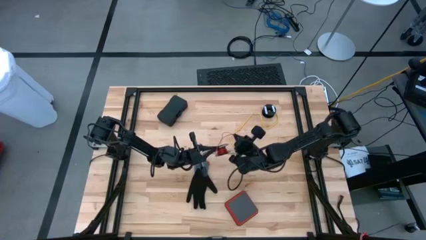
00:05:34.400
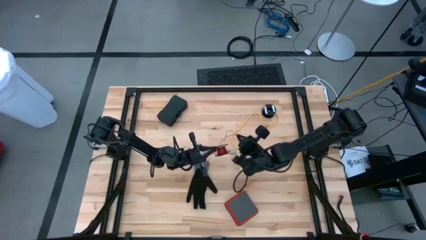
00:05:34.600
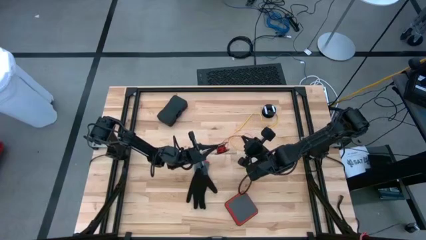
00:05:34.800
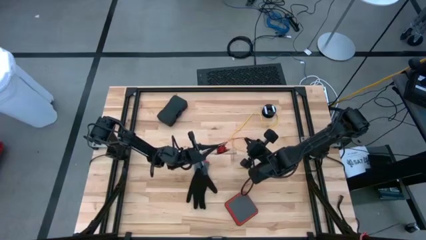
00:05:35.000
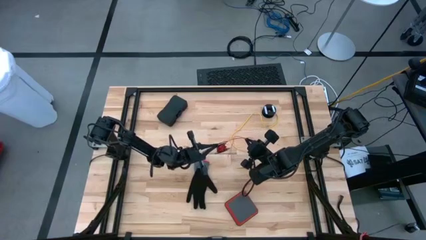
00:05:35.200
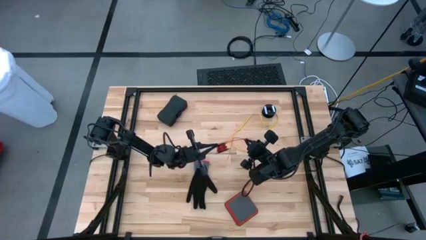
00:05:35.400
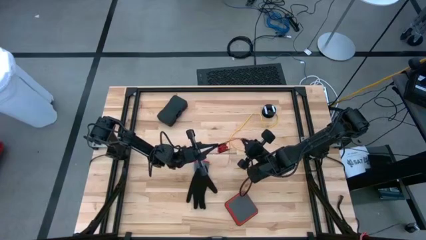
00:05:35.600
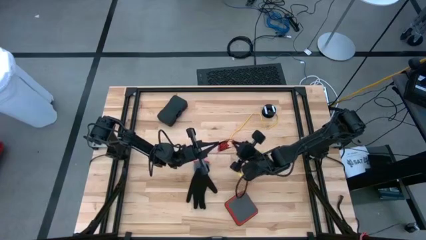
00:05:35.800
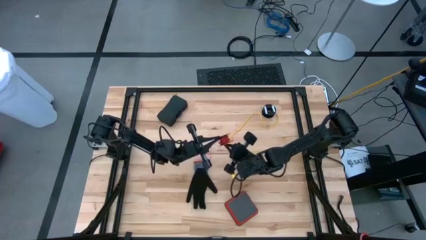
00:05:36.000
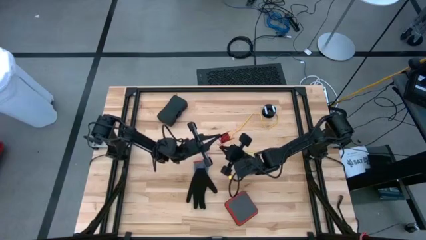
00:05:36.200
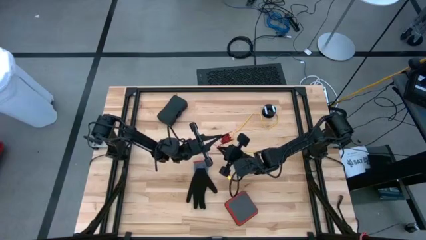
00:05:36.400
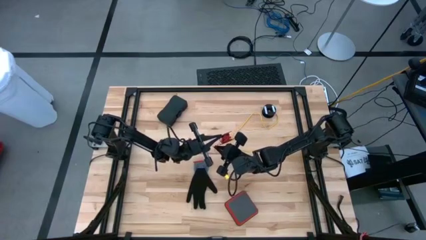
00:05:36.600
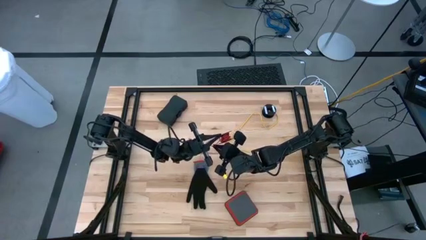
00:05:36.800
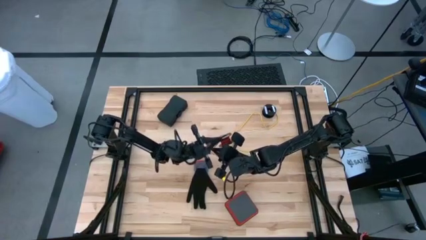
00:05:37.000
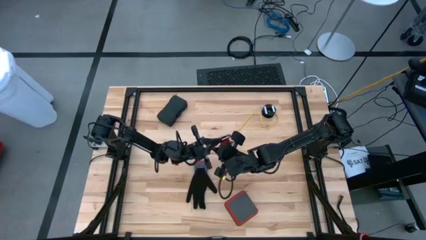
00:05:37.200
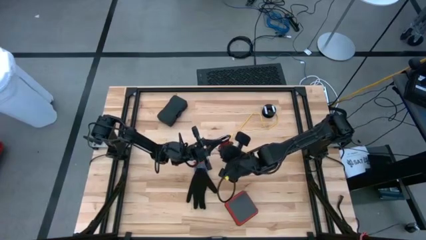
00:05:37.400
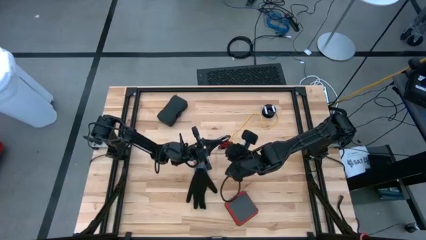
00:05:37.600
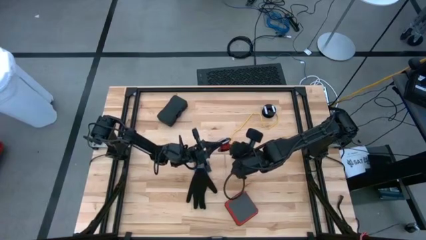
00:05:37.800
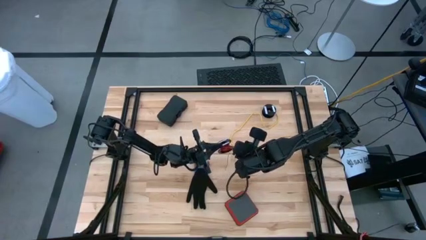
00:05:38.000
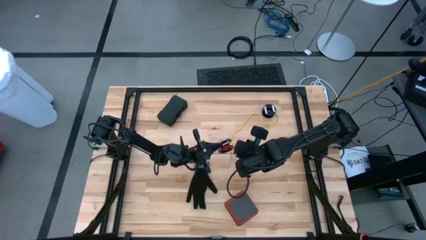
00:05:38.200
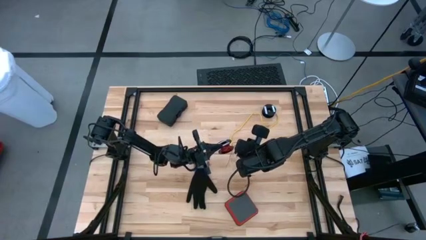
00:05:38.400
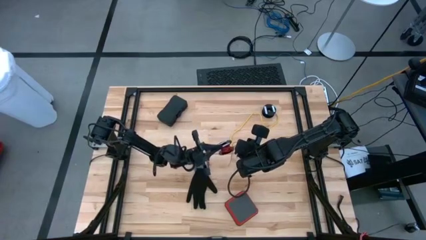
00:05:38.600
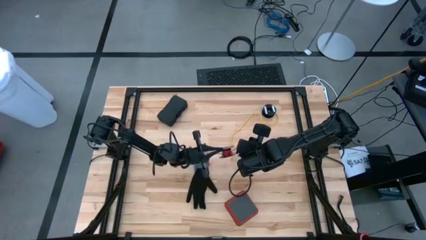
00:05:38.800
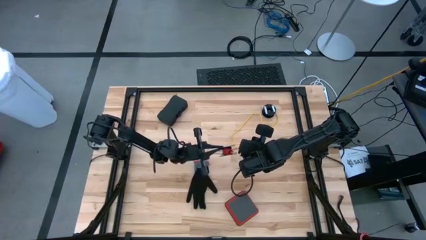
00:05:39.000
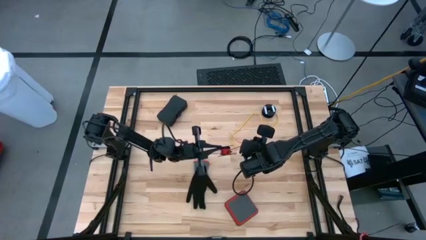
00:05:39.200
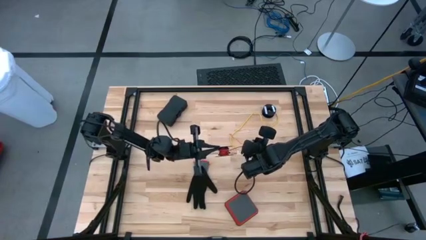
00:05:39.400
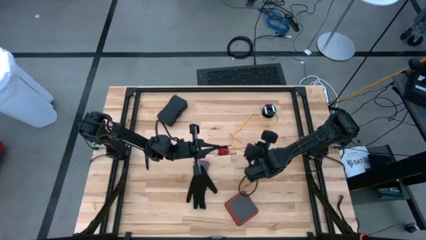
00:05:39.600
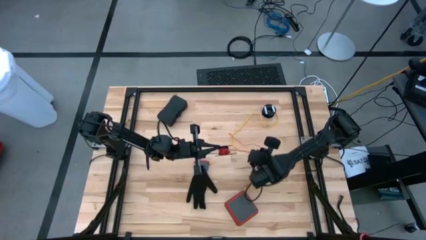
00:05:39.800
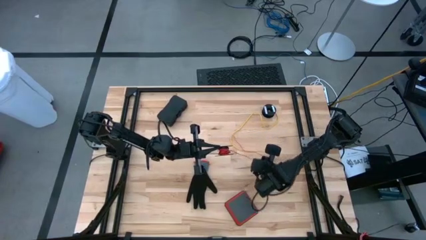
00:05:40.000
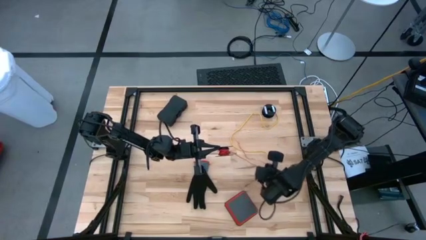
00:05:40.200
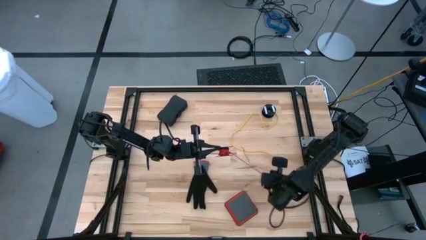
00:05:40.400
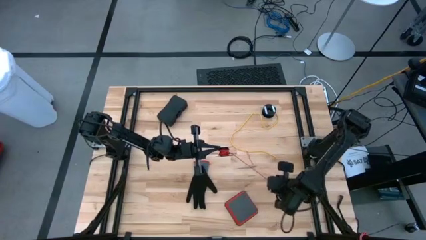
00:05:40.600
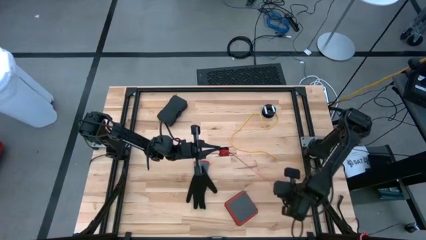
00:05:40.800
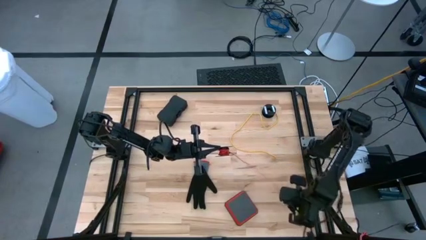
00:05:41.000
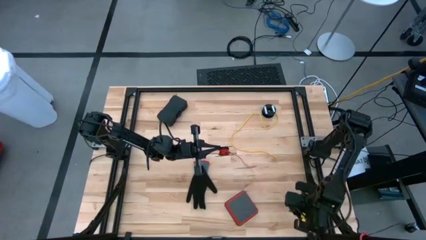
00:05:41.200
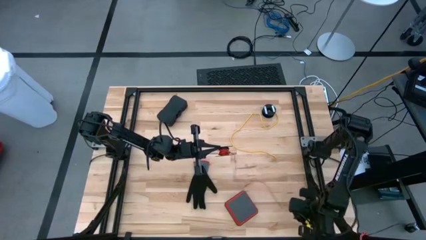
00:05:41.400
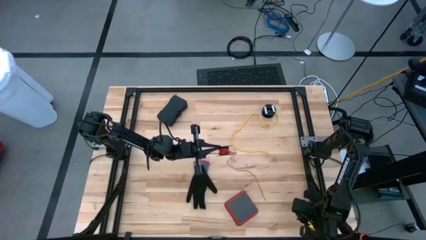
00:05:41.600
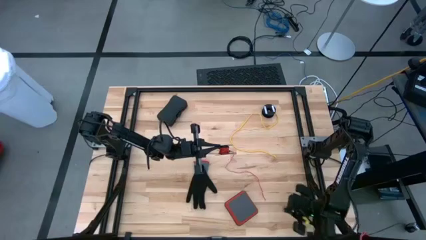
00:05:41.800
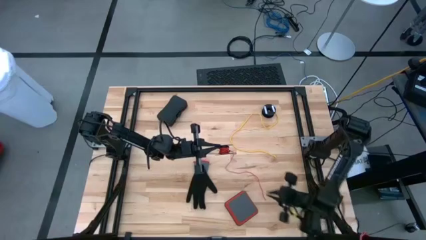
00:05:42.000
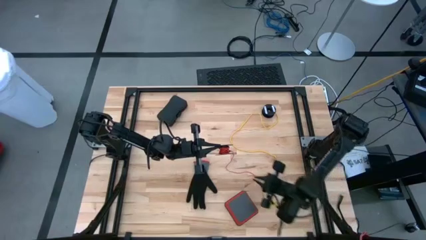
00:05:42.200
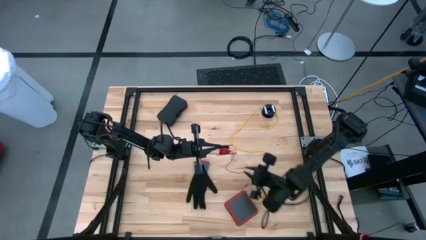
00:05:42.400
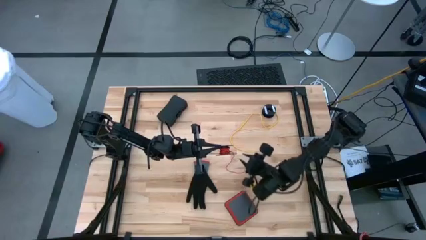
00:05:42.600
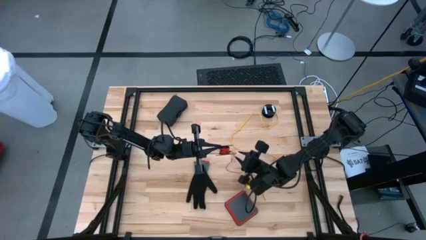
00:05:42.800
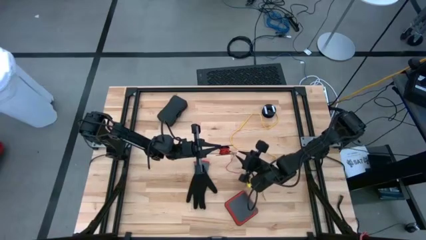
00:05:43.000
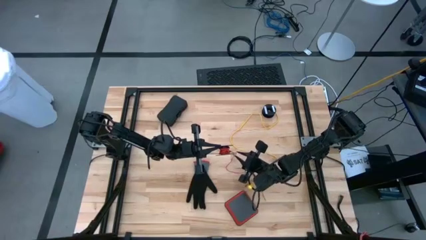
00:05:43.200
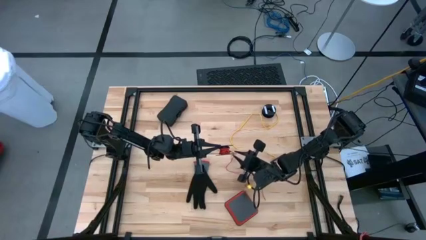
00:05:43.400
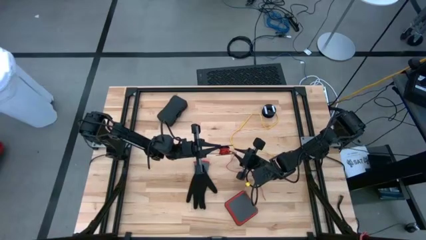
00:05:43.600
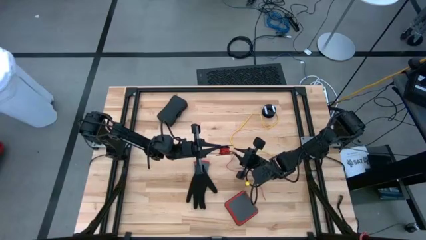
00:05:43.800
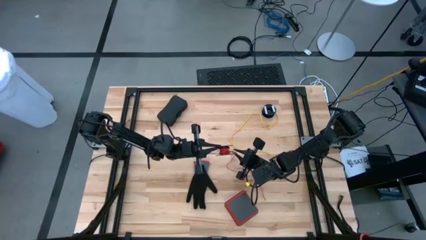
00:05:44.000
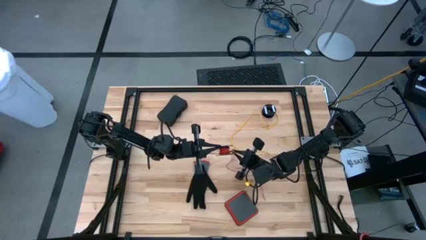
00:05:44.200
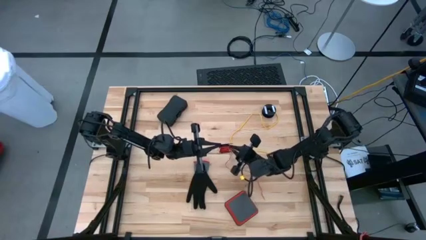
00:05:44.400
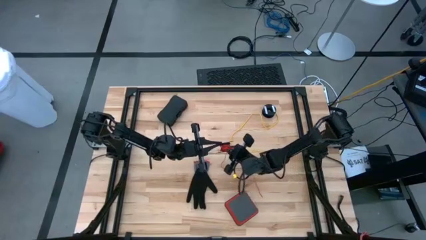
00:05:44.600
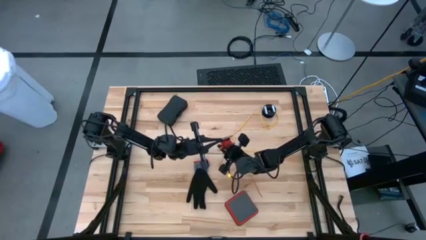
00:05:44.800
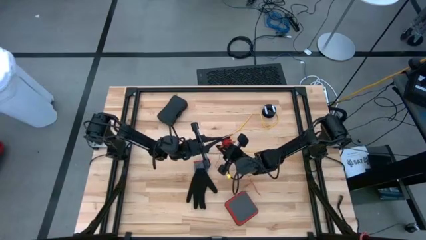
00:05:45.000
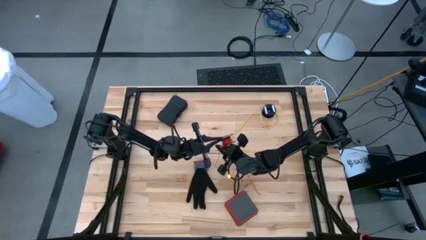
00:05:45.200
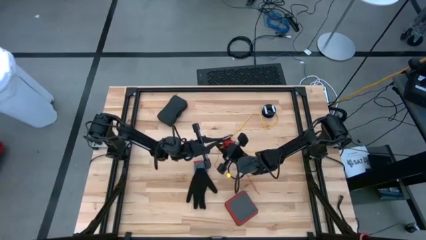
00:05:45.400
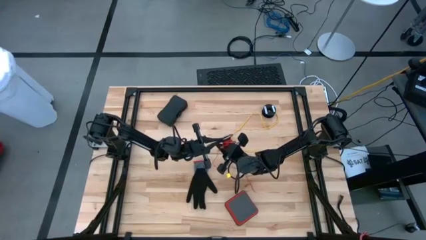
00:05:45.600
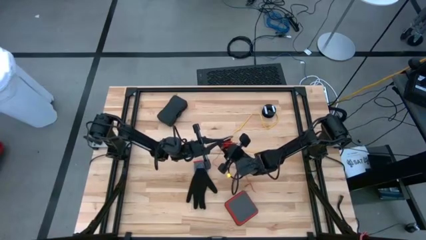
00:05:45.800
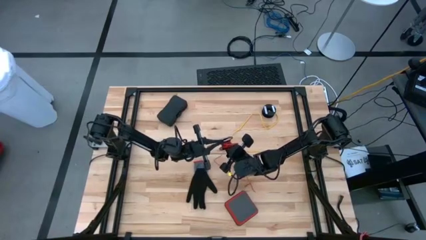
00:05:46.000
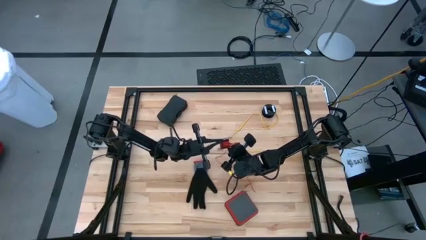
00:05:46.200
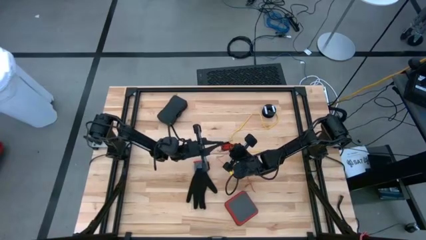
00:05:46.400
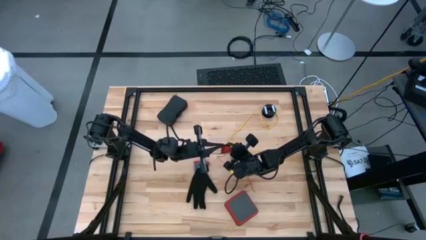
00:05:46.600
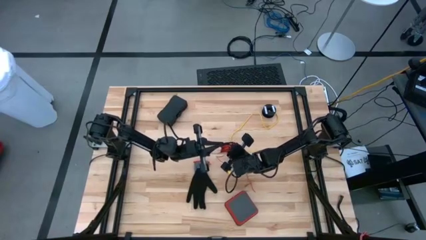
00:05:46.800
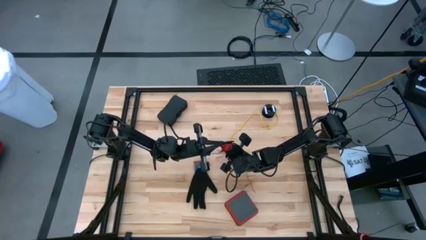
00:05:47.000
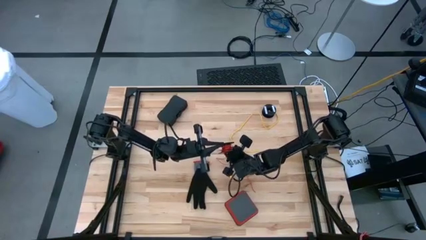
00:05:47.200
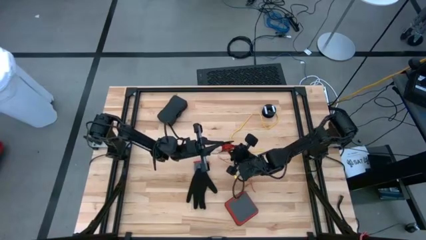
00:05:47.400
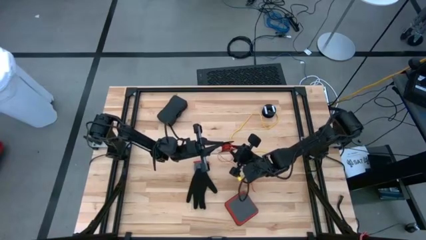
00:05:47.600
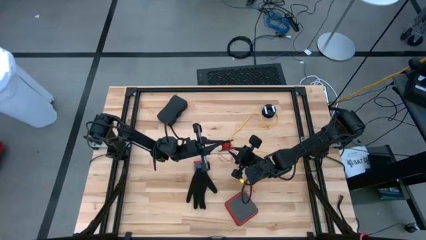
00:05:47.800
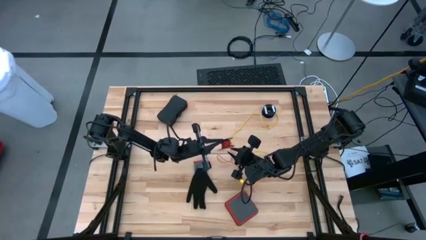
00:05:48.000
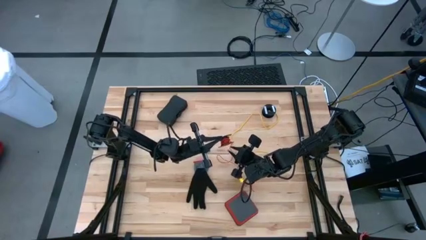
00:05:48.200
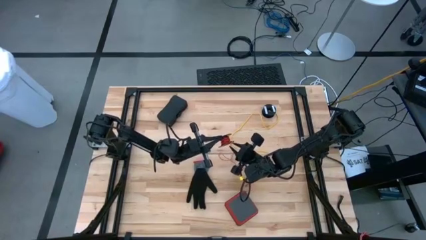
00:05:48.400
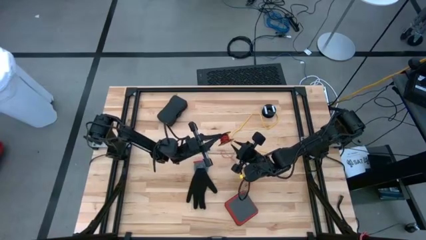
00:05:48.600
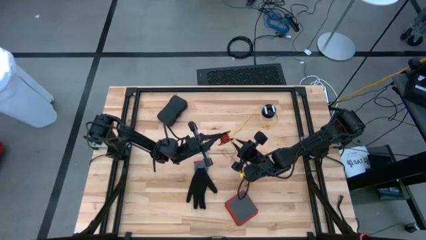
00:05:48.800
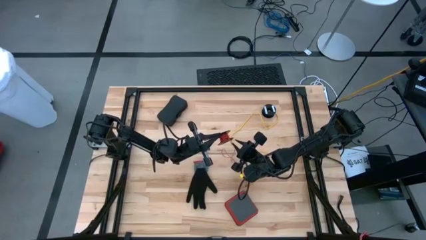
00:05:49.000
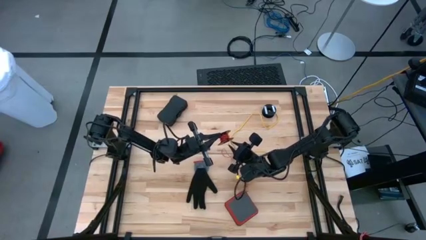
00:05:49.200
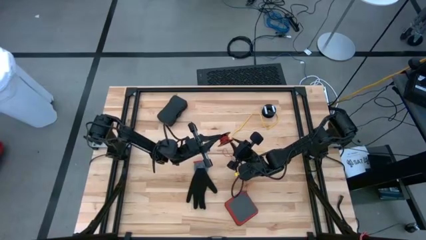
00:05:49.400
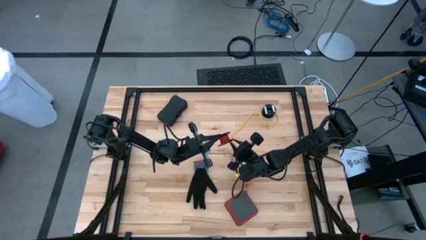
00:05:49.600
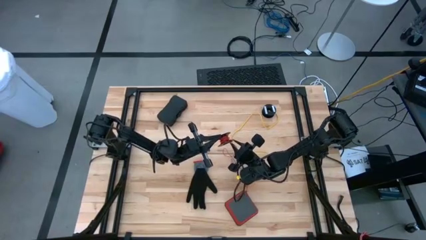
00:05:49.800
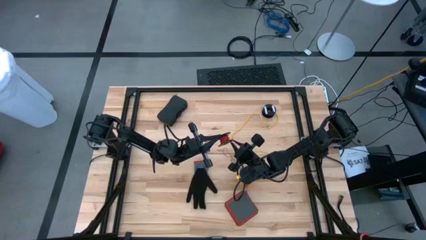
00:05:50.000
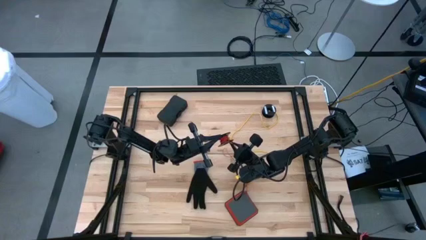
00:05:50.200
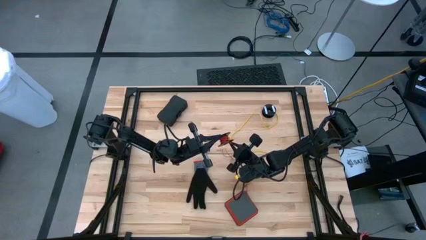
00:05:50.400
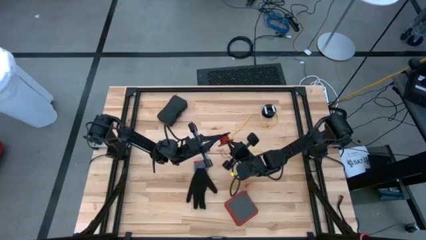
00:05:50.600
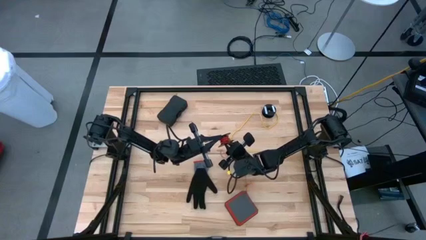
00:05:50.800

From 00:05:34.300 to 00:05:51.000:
Task: Coil cords
Coil the red wire onto the black spool
